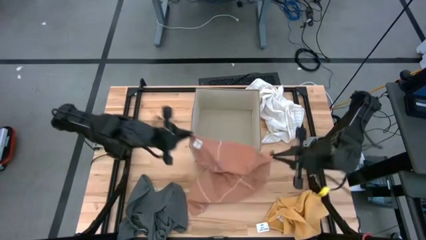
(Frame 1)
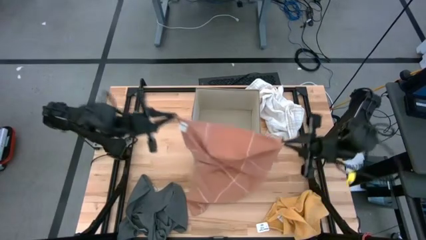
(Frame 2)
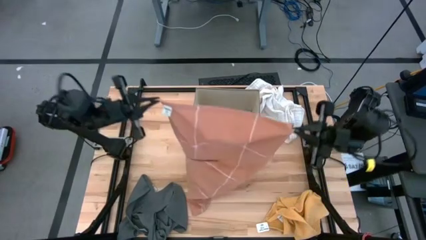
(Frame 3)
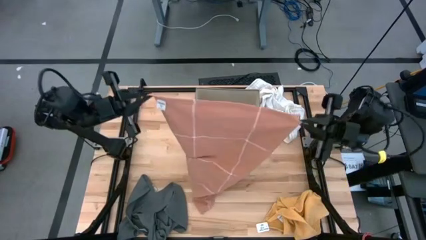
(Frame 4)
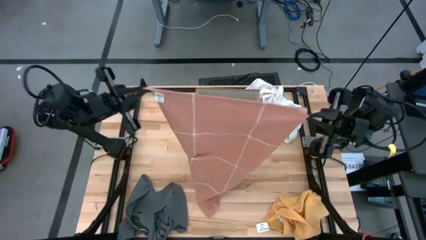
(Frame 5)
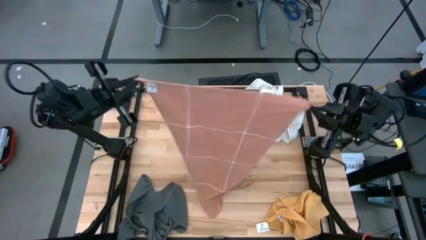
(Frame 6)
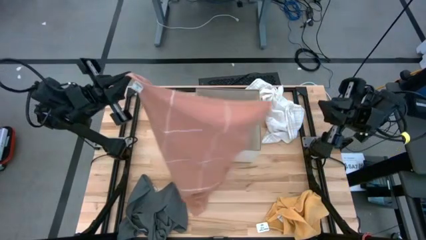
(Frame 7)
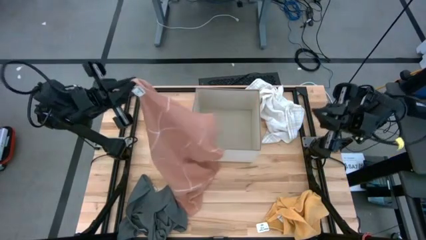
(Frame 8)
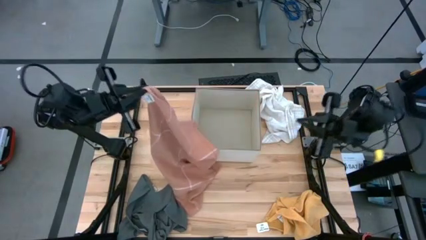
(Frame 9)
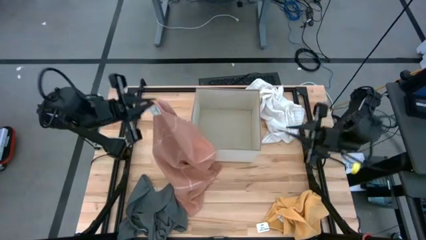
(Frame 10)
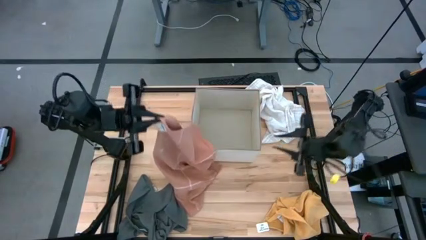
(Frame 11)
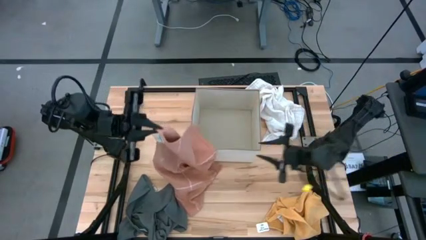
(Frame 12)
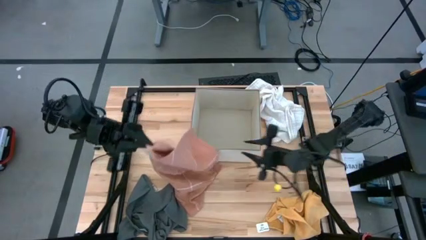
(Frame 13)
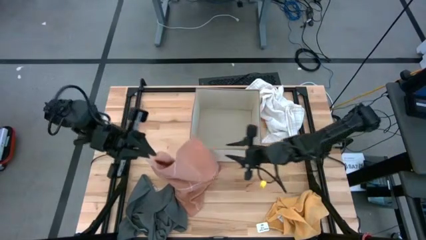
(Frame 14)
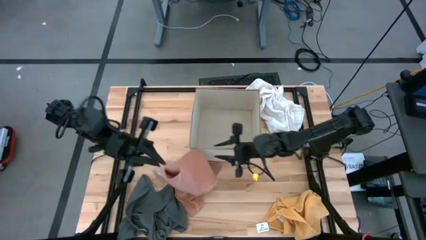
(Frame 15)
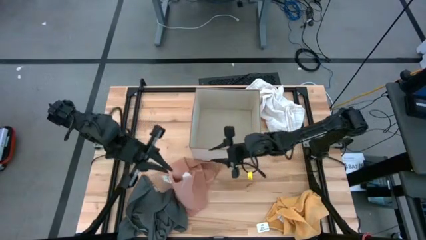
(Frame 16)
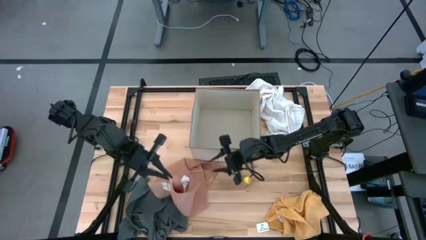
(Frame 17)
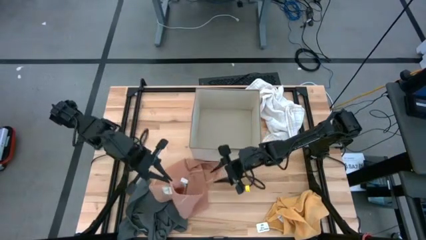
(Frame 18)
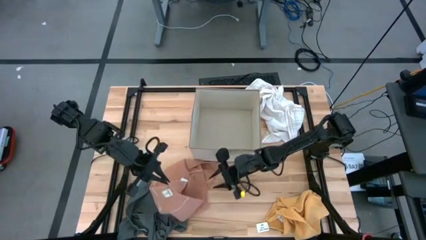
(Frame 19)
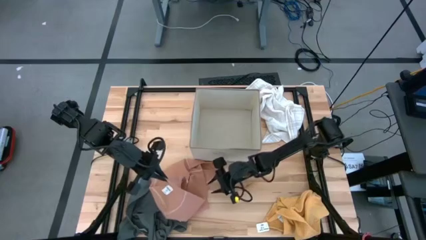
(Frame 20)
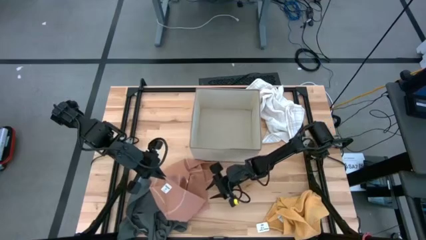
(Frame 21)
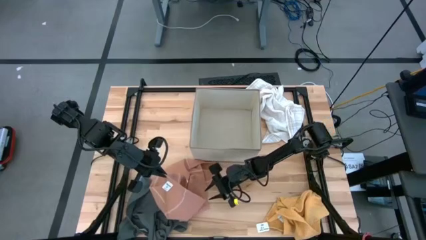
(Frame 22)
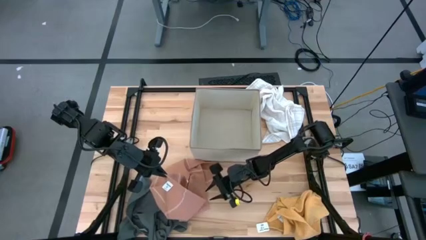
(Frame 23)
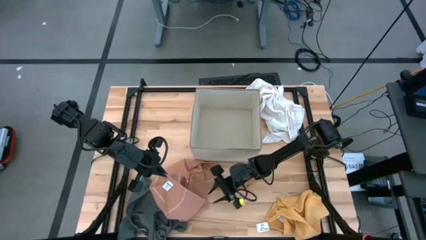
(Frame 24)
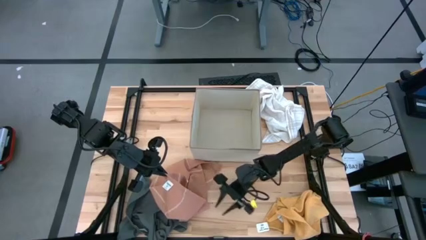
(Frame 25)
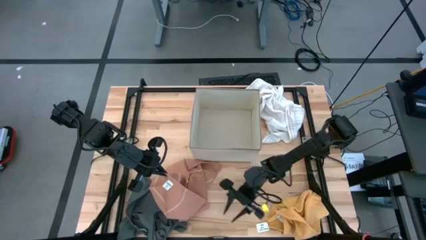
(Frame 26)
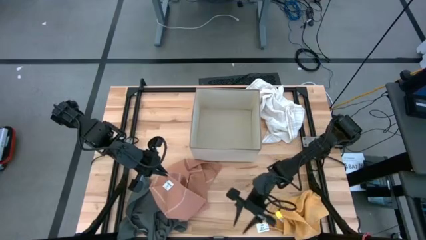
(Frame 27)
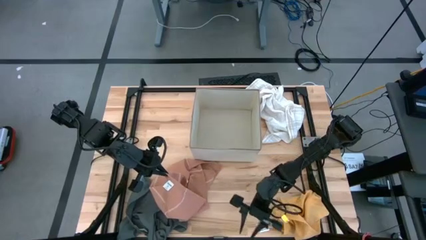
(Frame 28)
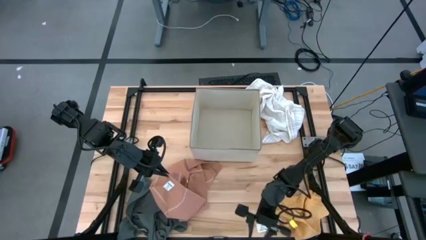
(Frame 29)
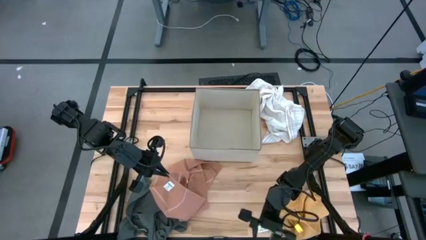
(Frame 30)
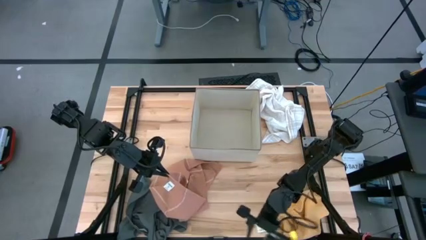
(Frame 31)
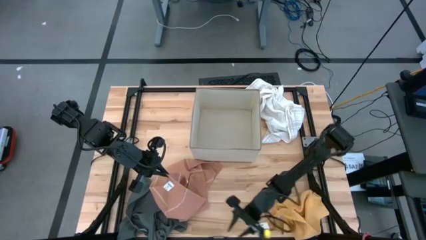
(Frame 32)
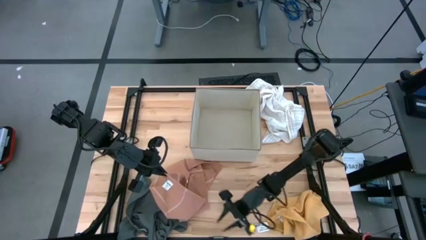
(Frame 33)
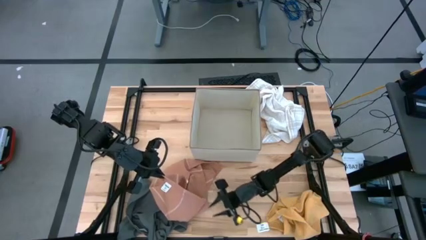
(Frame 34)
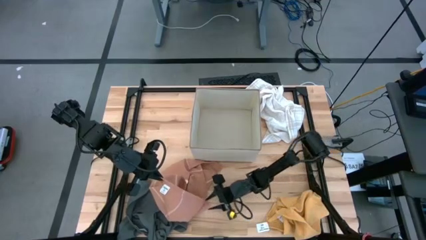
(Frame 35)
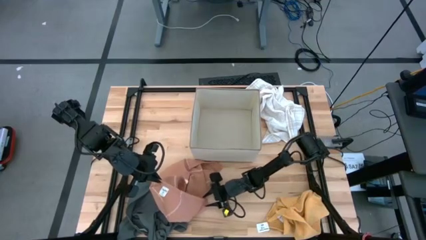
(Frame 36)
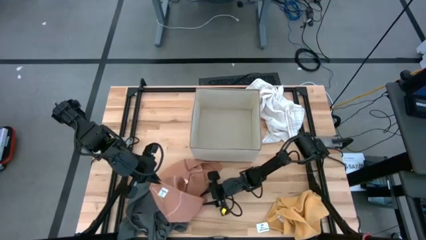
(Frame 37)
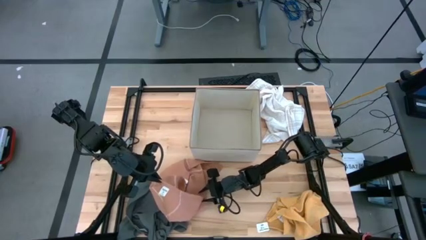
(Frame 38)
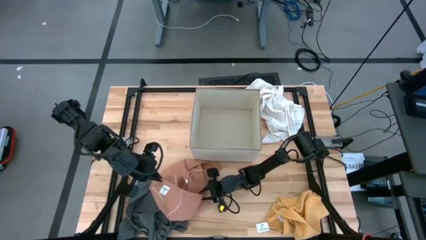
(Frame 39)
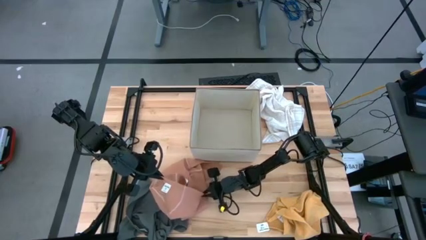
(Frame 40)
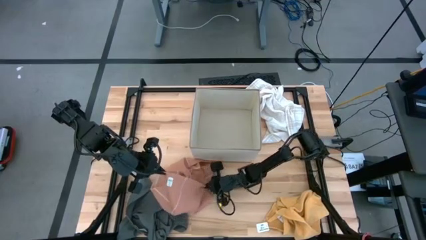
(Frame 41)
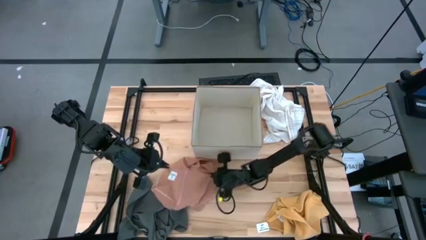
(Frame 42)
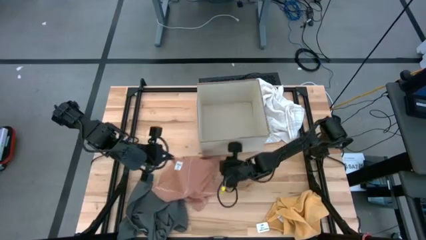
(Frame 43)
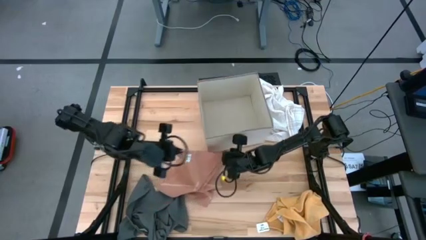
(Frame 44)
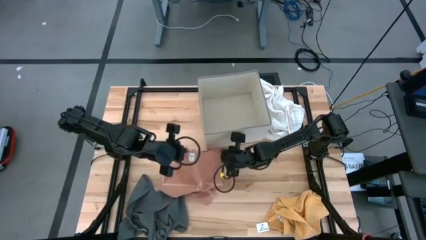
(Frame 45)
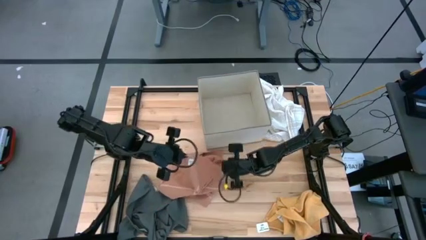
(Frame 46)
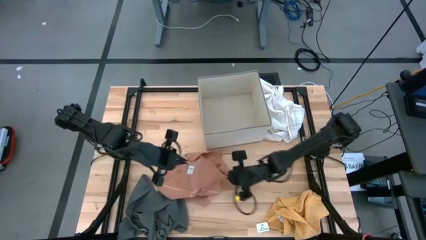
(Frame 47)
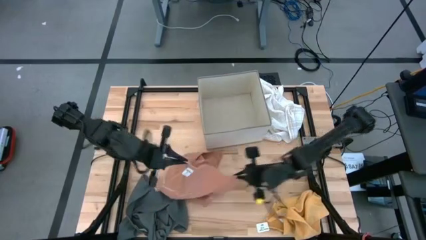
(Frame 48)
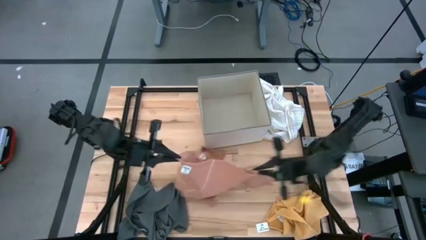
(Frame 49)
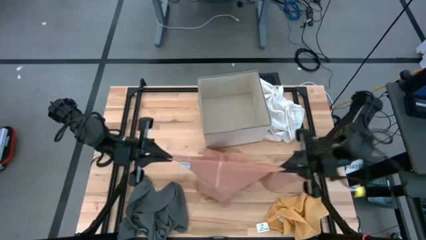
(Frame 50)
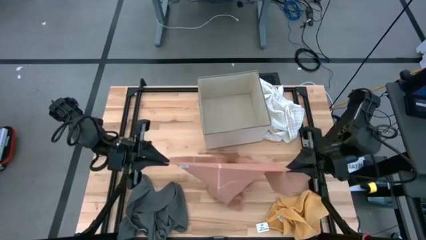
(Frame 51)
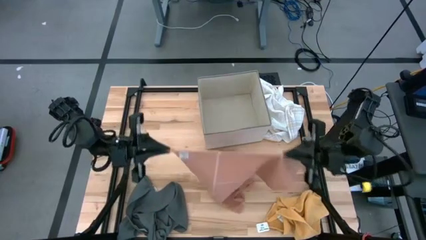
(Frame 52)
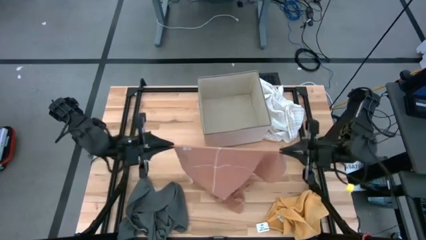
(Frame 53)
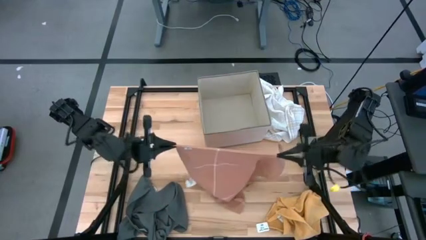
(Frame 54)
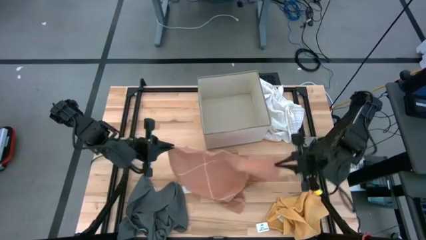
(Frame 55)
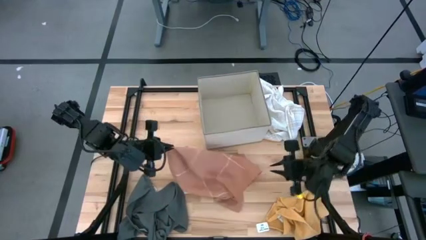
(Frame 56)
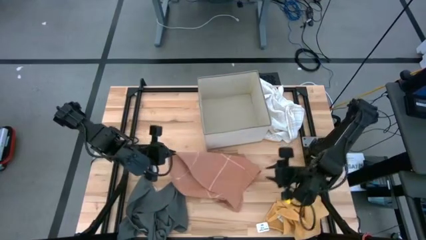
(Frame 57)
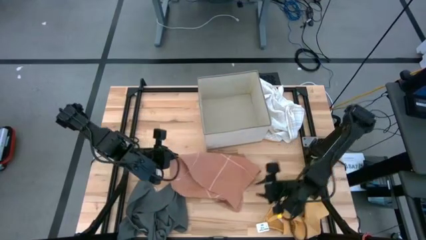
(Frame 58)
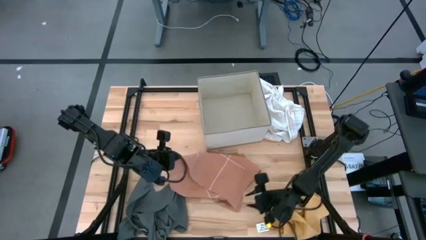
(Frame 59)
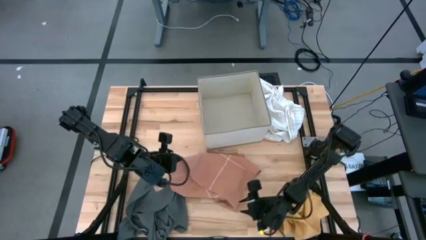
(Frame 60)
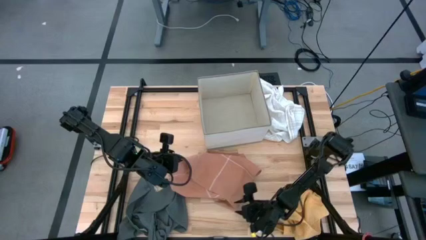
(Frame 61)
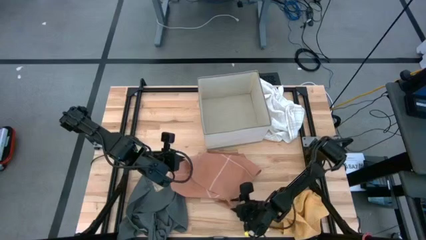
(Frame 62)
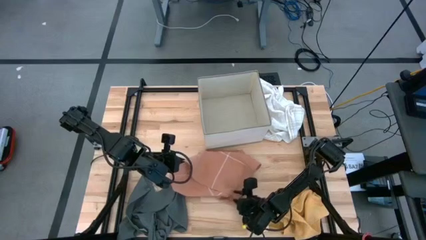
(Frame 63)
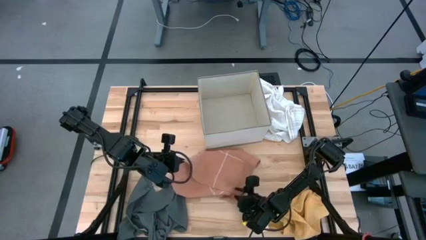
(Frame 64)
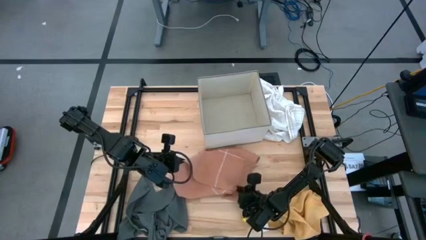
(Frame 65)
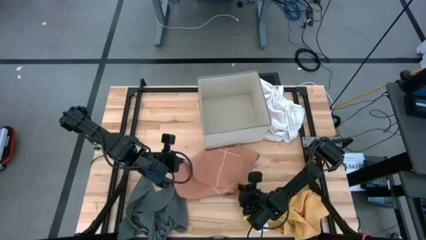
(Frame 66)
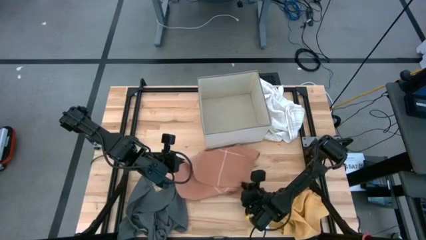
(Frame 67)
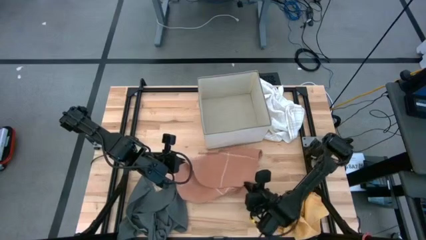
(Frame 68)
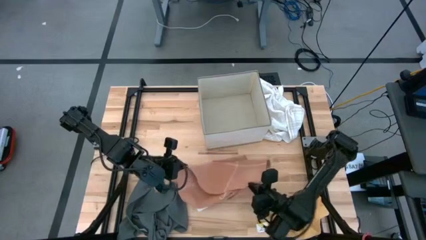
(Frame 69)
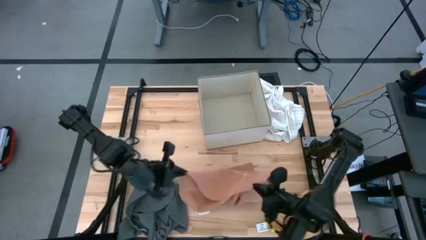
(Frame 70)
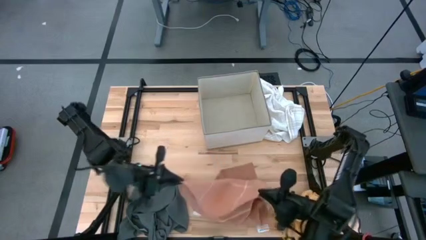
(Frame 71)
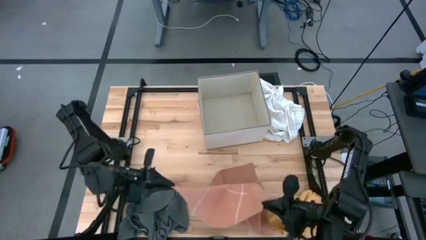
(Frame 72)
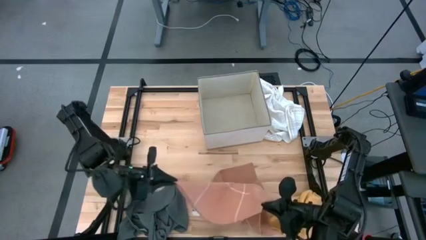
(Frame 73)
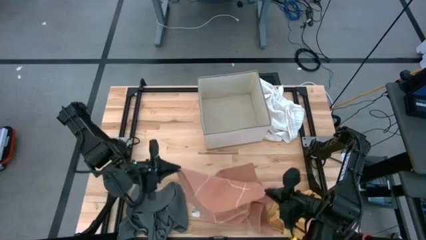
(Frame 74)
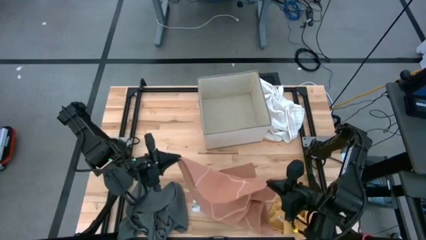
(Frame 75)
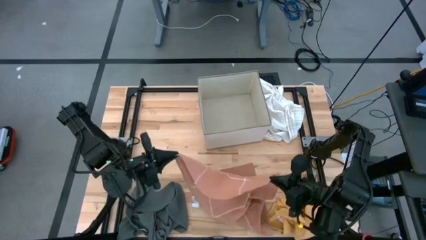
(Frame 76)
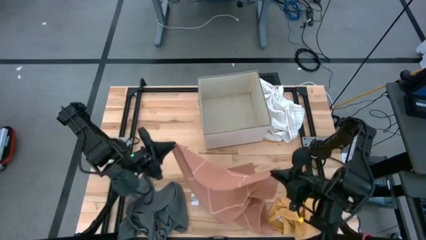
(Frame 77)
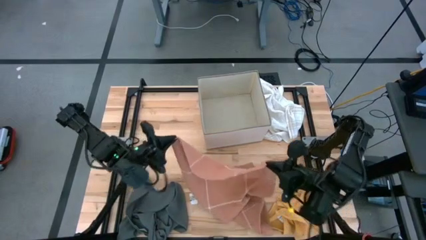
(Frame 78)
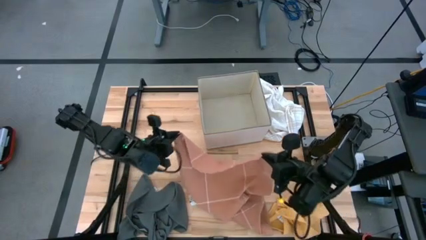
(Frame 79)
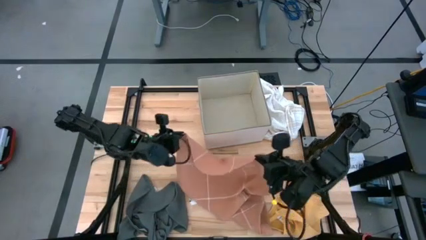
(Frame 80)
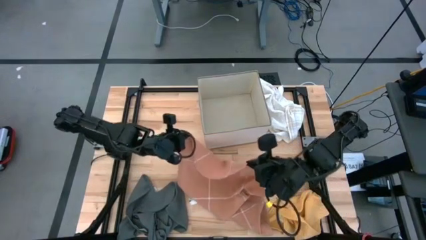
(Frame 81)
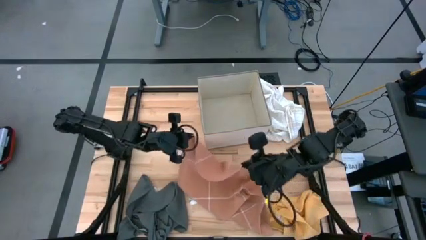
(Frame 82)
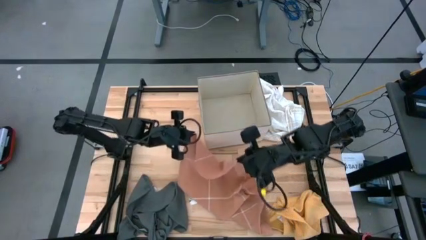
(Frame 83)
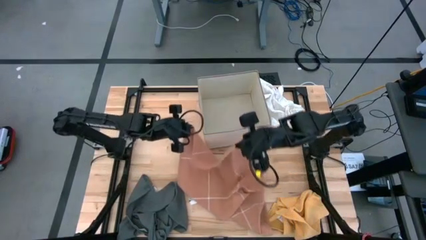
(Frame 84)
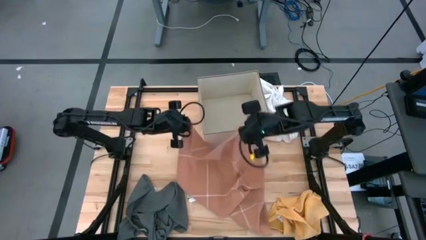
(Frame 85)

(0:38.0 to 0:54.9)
Task: Fold towel
Fold the brown towel
